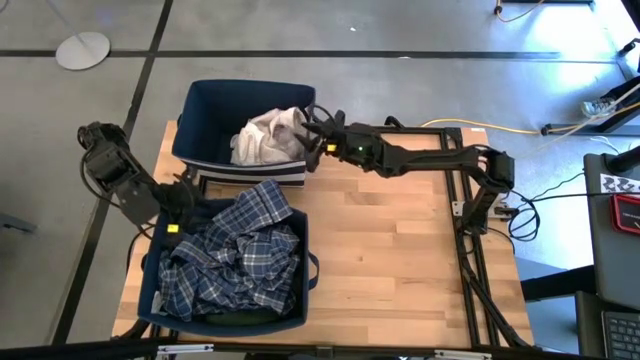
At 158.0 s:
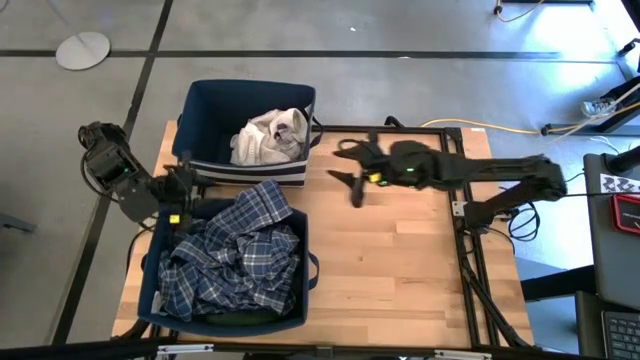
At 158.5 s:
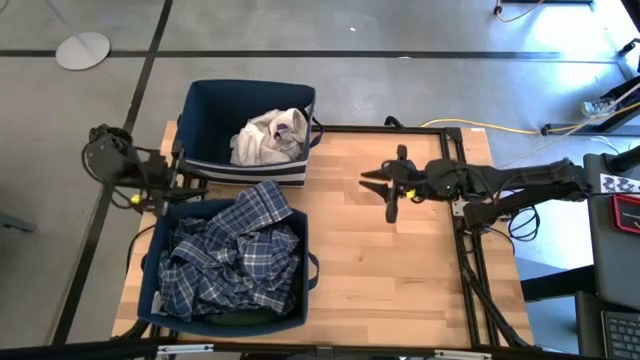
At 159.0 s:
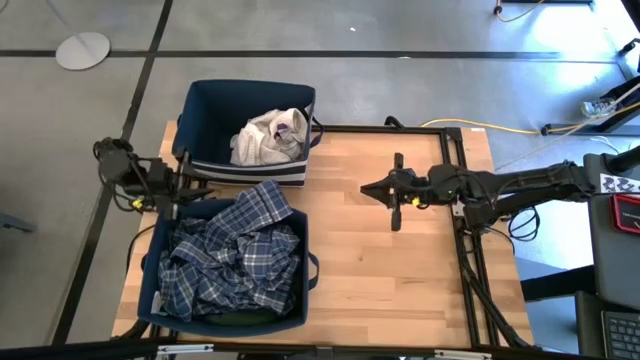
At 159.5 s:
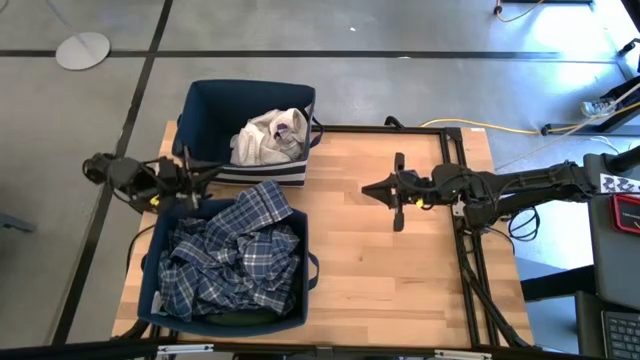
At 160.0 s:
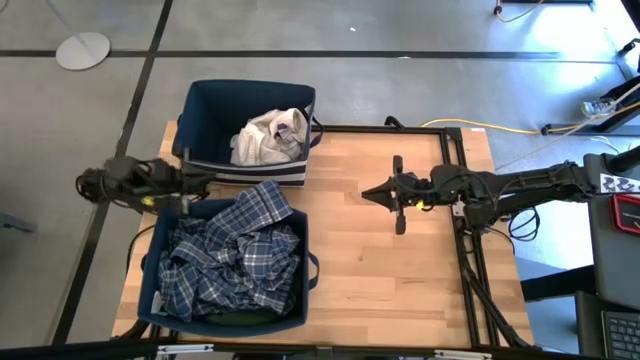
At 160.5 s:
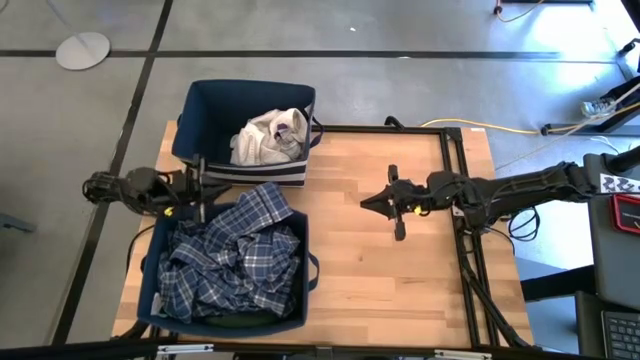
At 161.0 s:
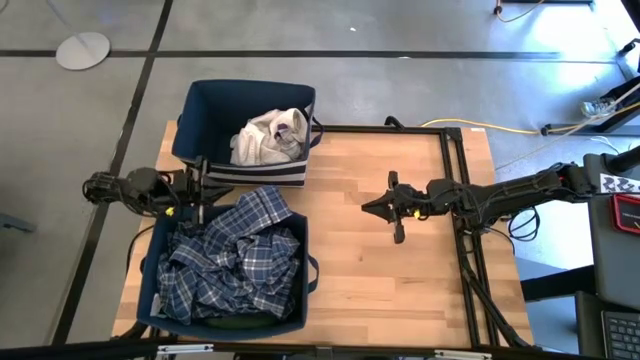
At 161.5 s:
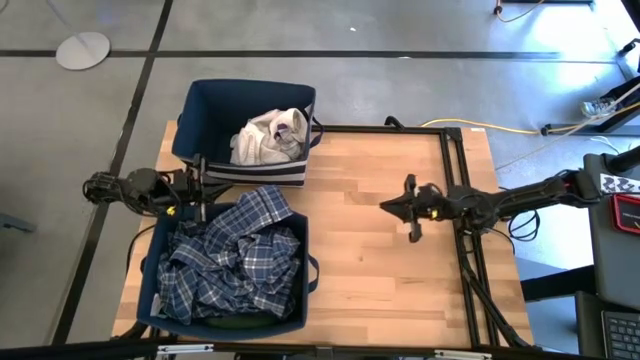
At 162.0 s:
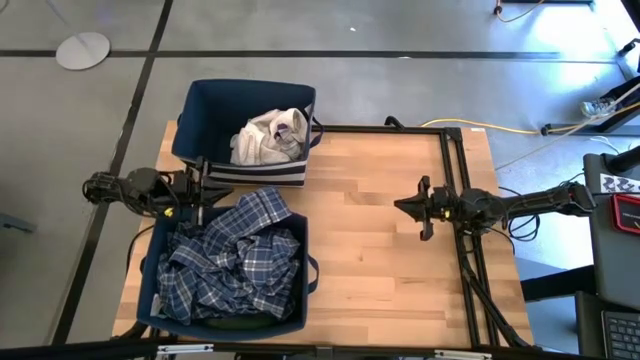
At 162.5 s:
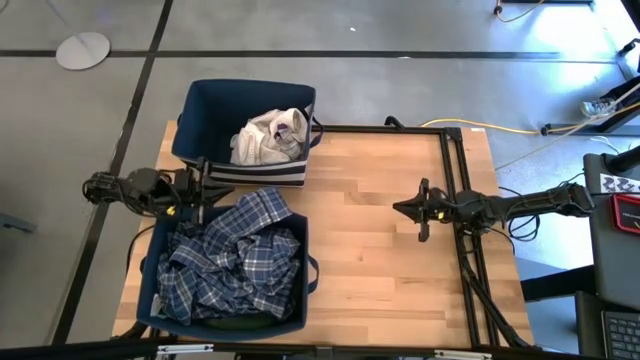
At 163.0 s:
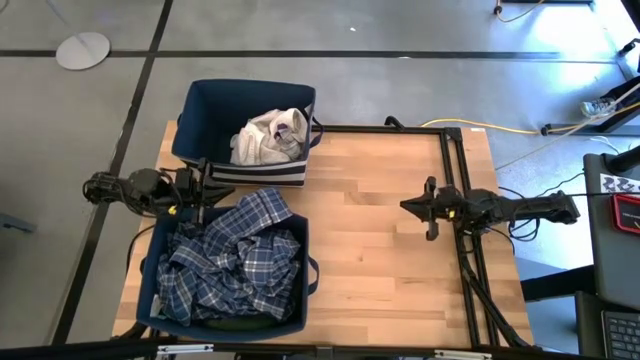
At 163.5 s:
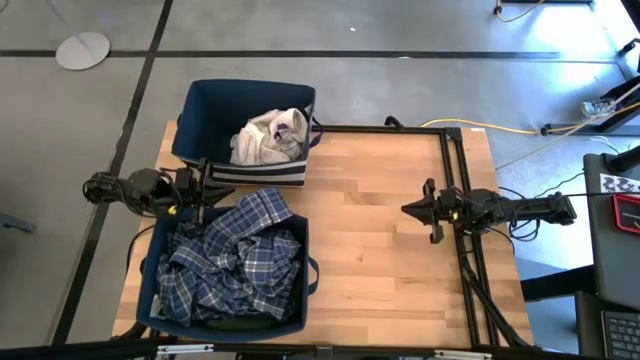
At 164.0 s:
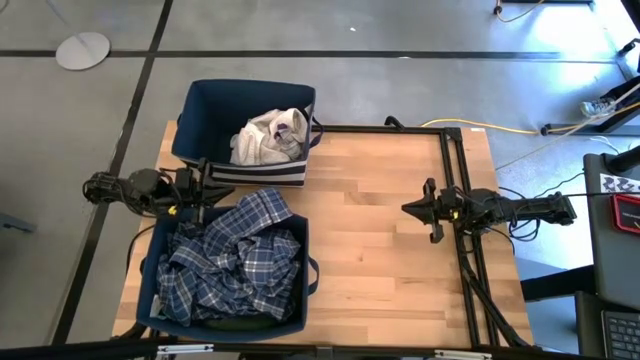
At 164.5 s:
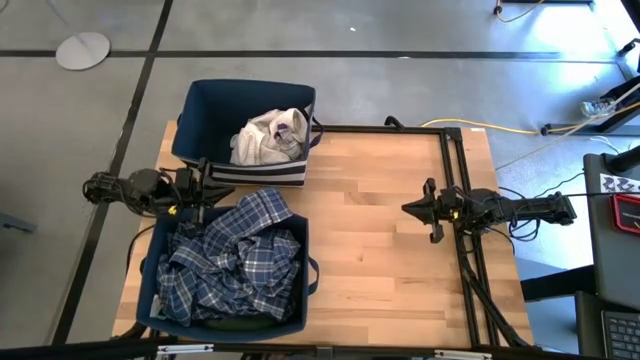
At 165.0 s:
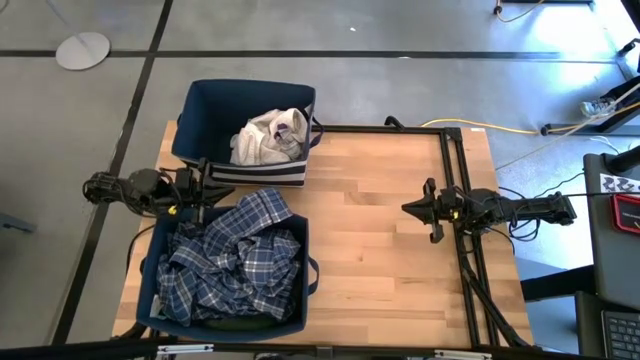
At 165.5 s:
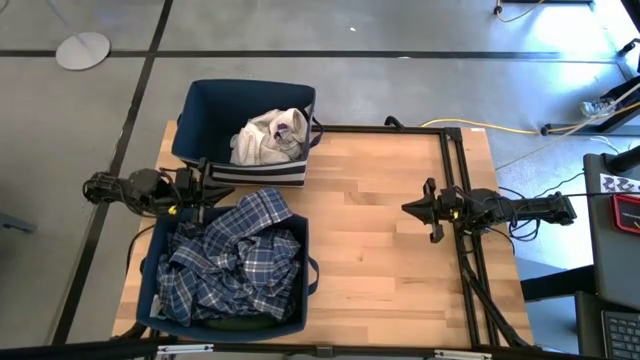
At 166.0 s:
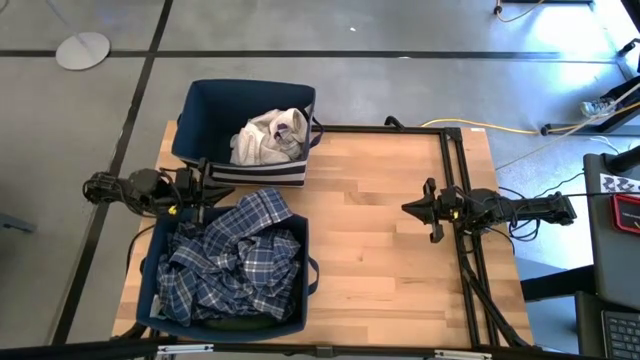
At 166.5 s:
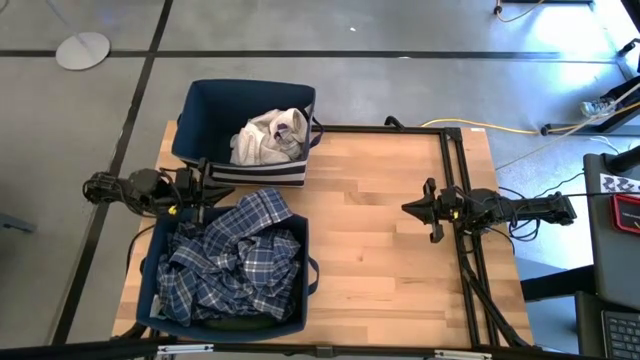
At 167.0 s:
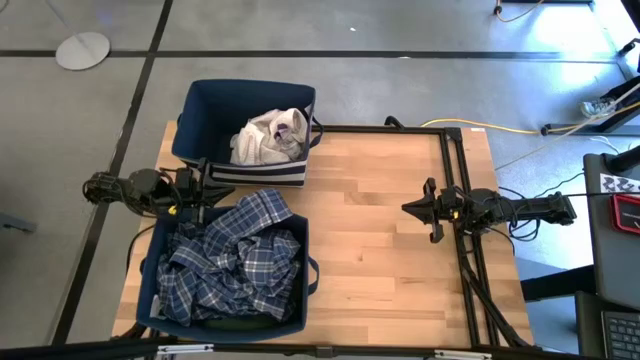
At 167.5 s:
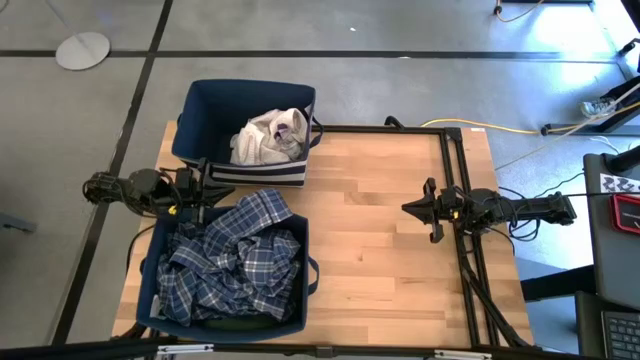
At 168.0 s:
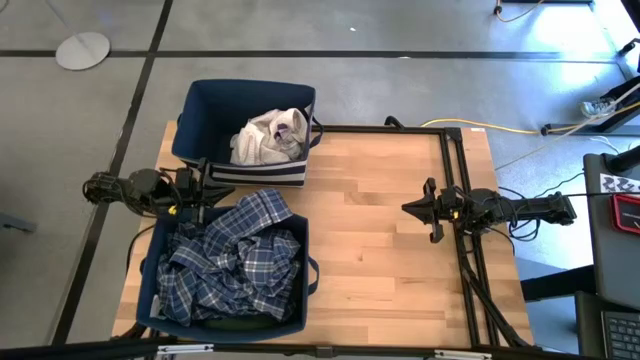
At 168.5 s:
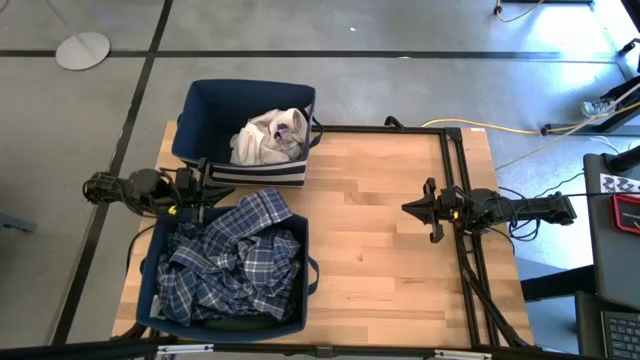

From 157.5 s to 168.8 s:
Task: Sort clothes
Return to Home Position

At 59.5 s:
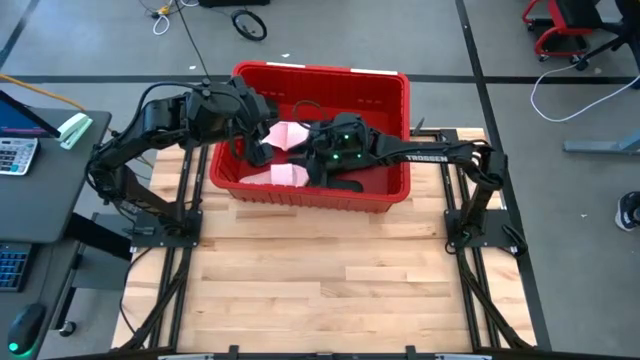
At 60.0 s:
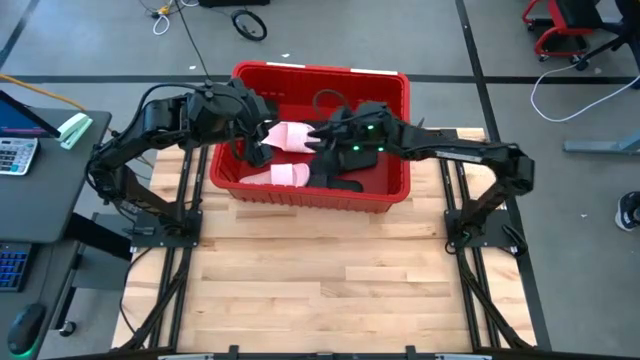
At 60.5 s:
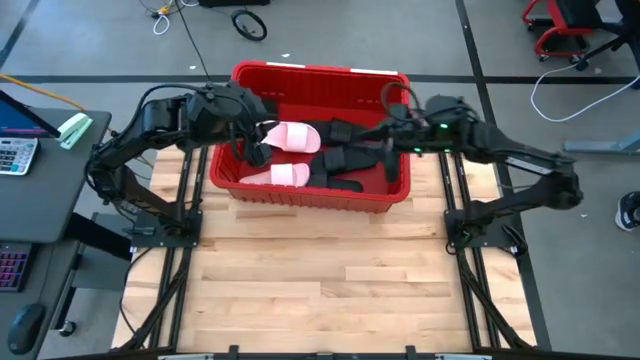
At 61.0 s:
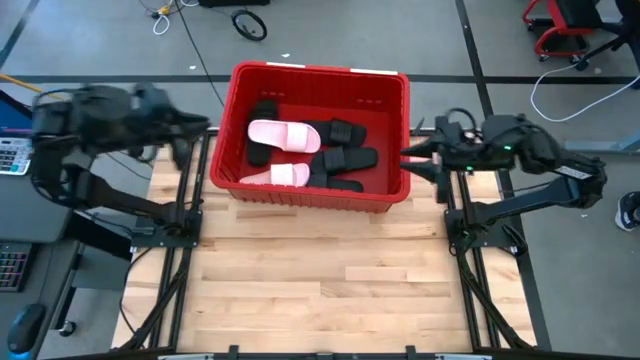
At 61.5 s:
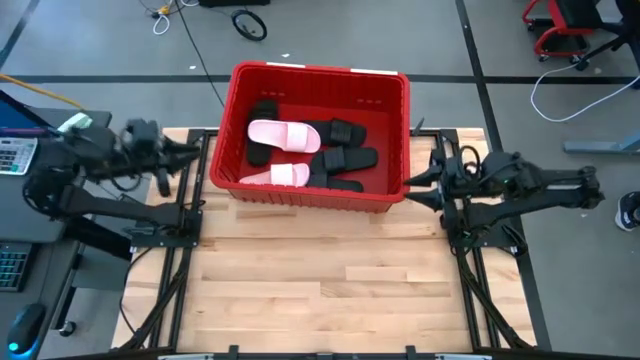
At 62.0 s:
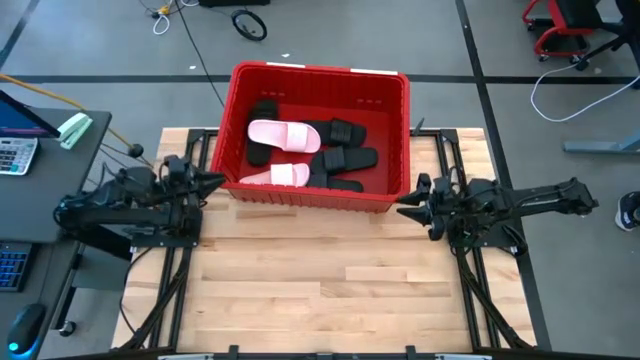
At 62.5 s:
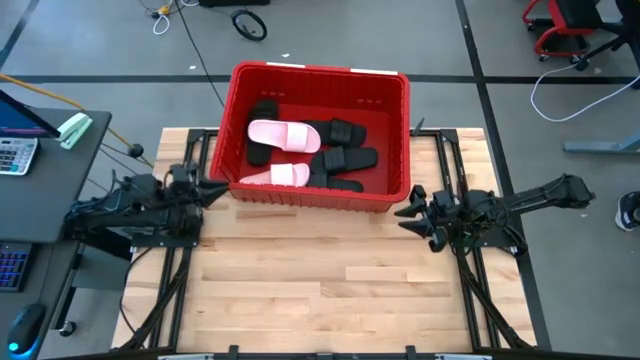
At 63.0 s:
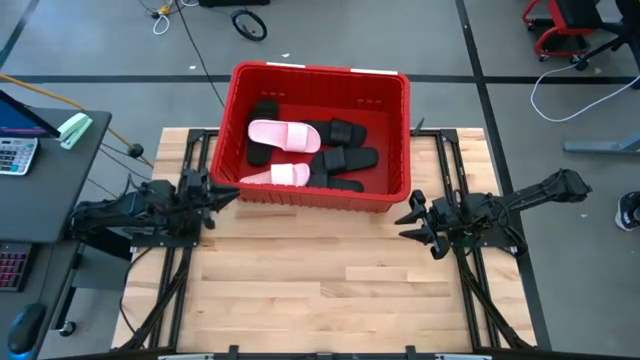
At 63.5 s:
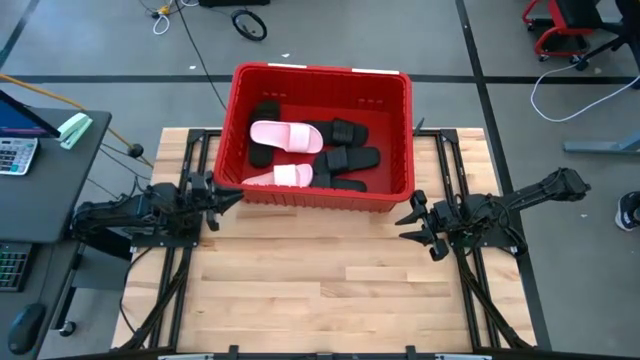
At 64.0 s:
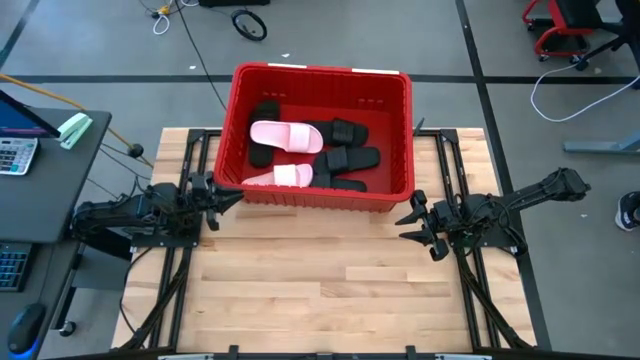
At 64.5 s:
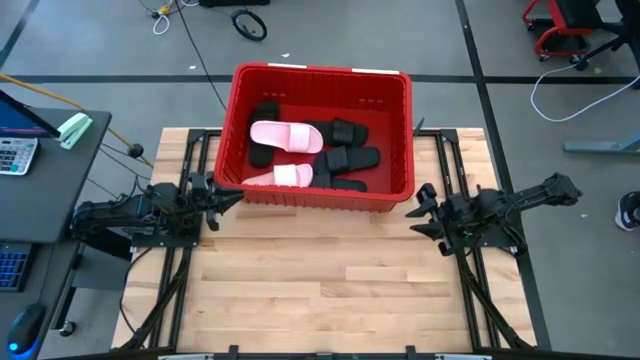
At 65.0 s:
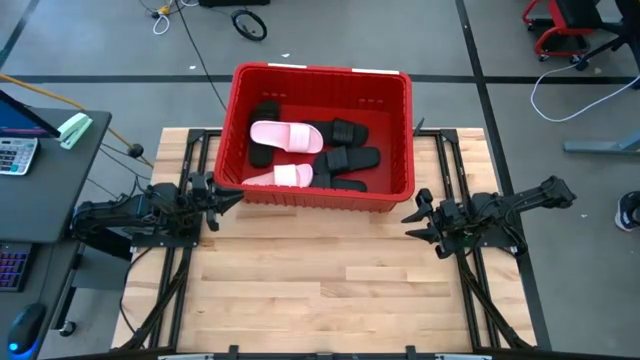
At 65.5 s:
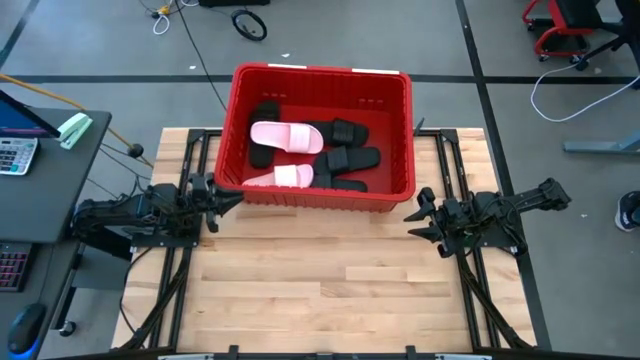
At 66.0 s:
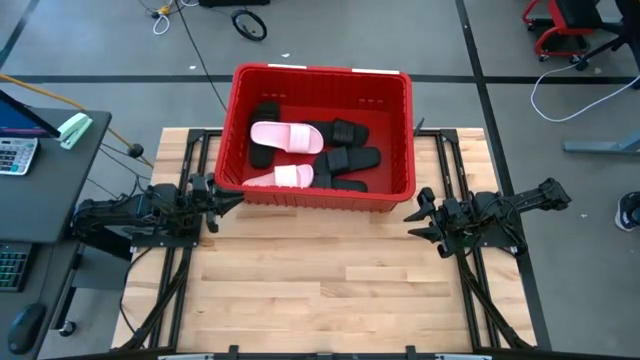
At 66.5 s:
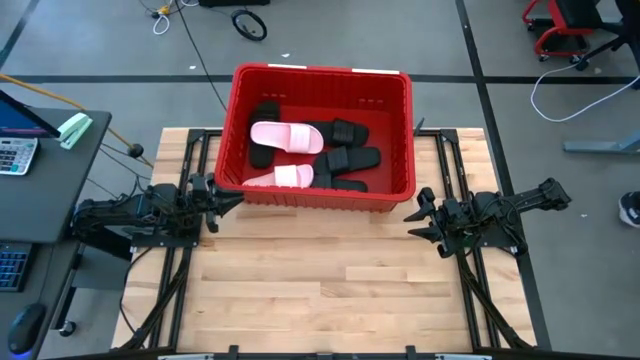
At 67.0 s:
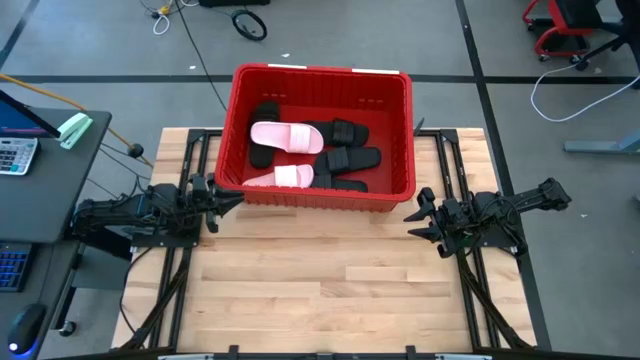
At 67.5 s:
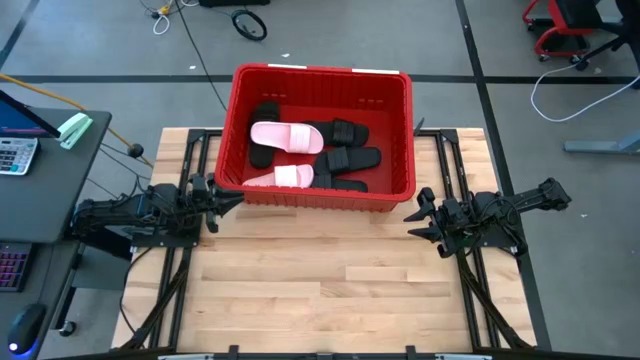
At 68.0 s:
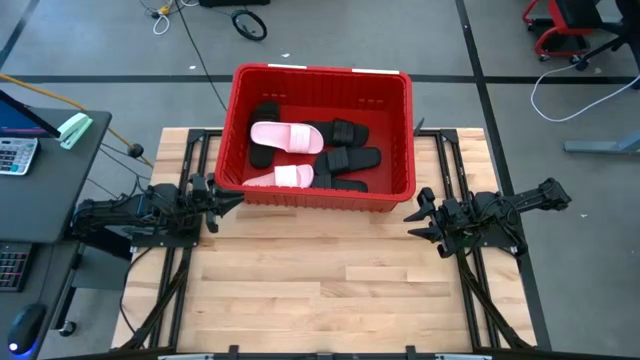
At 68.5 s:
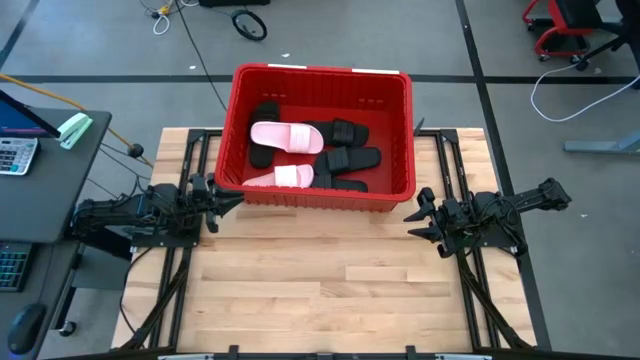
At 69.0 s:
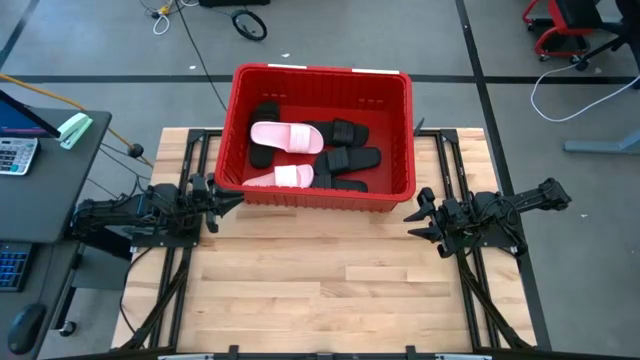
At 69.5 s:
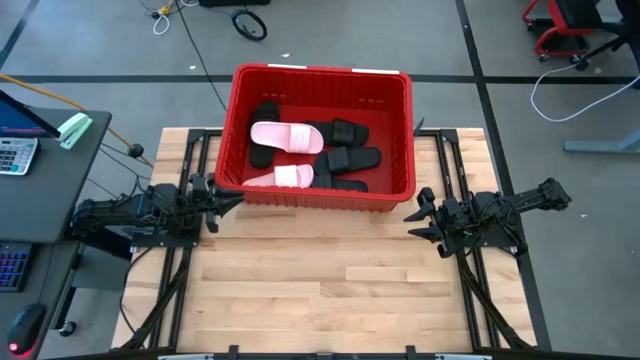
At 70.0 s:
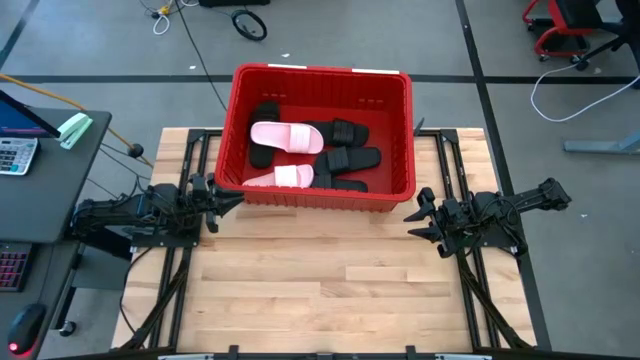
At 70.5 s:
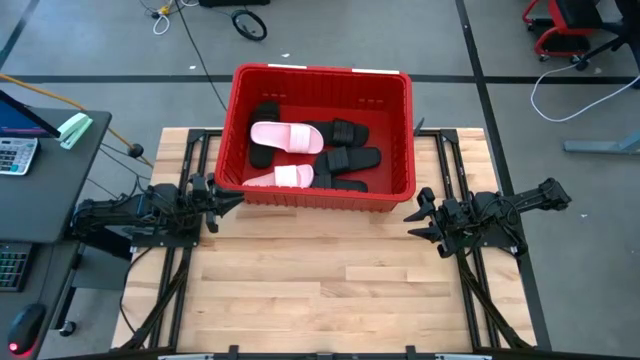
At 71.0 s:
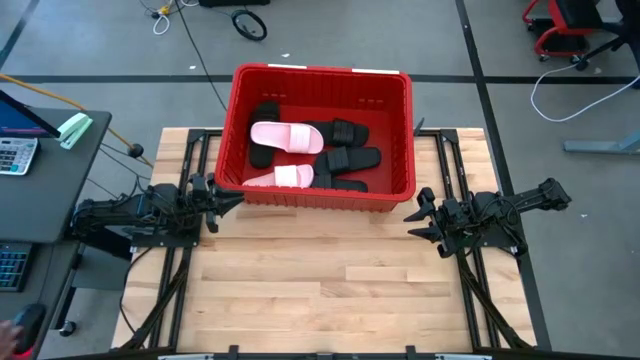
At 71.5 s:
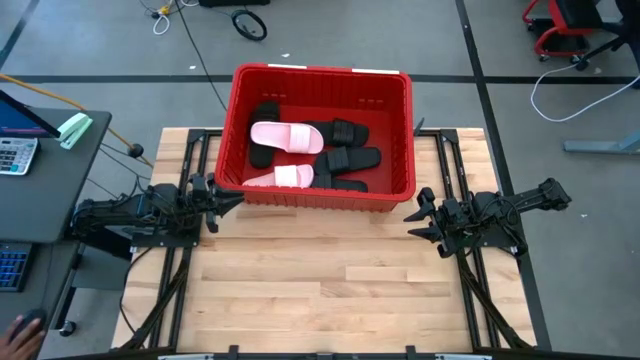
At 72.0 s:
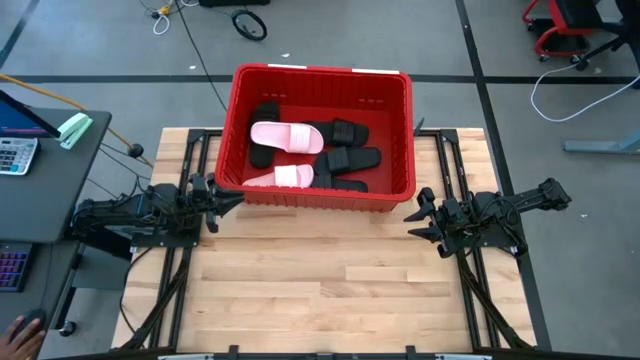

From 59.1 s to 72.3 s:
Task: Pick and place slides into bin
Return to Home Position
